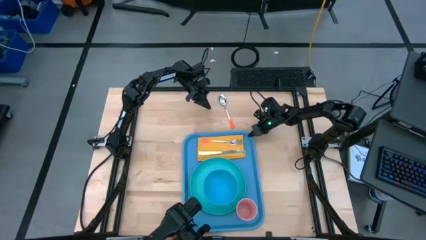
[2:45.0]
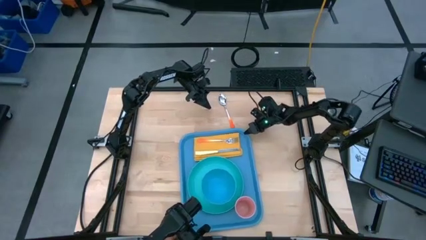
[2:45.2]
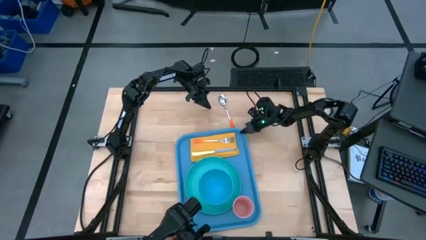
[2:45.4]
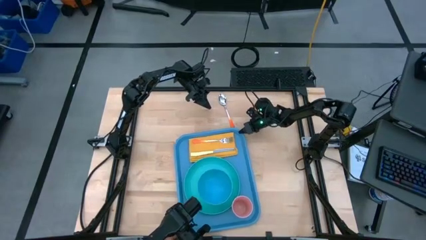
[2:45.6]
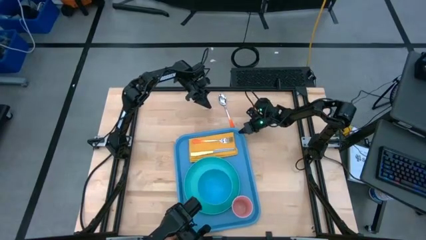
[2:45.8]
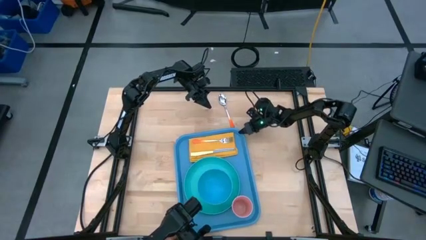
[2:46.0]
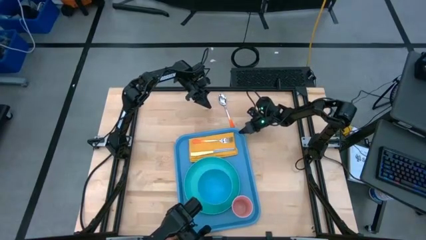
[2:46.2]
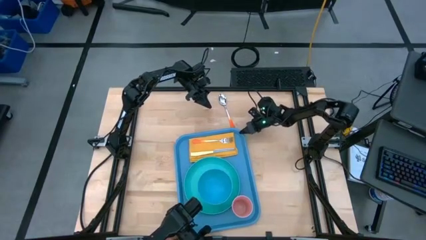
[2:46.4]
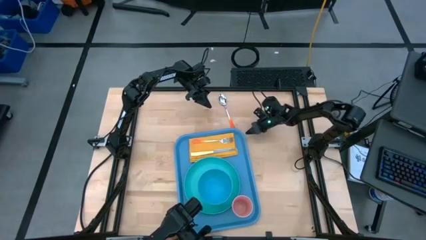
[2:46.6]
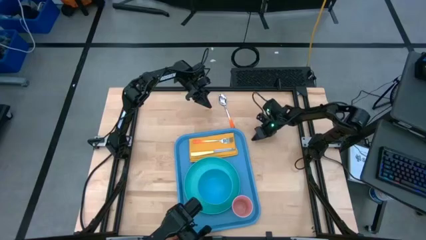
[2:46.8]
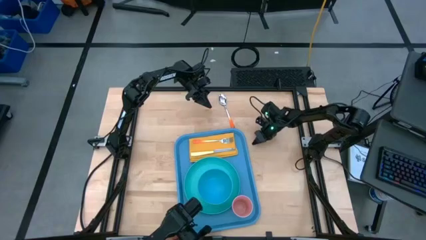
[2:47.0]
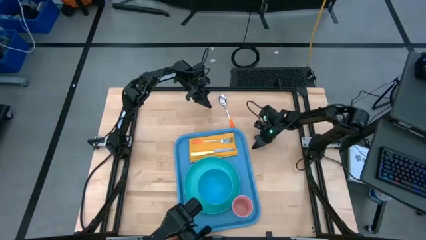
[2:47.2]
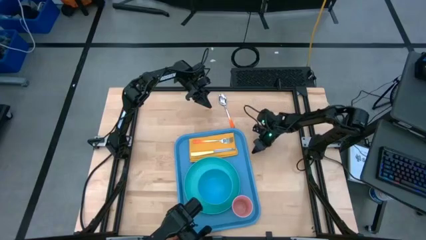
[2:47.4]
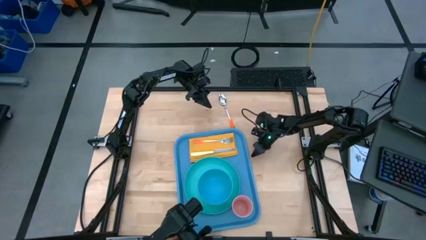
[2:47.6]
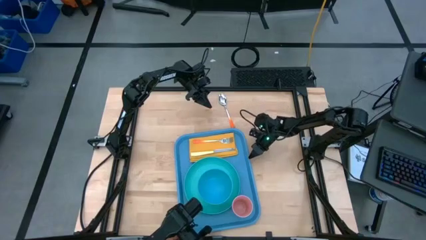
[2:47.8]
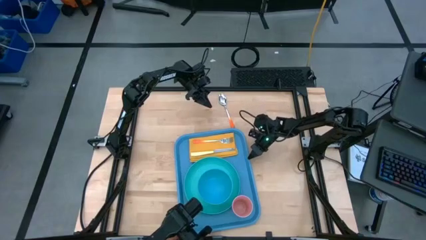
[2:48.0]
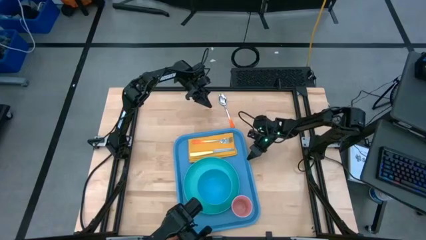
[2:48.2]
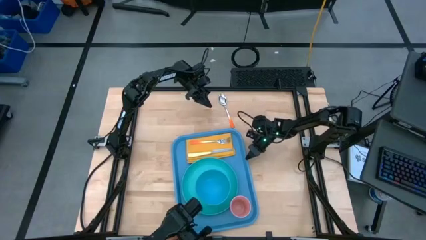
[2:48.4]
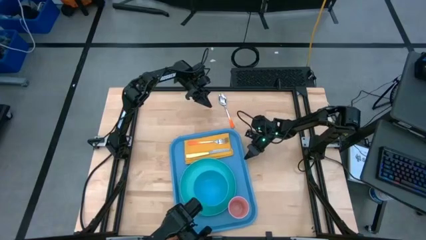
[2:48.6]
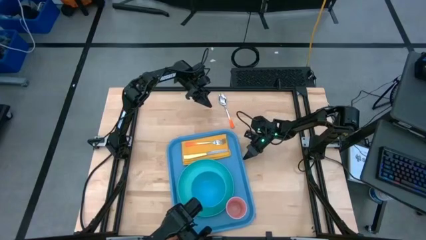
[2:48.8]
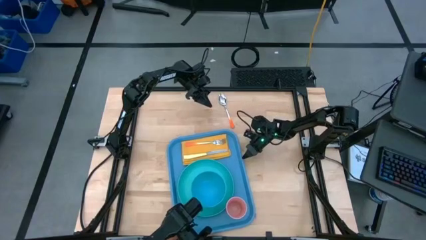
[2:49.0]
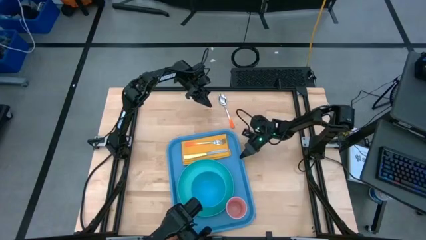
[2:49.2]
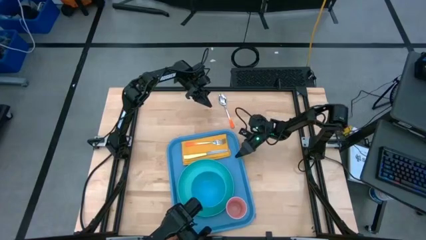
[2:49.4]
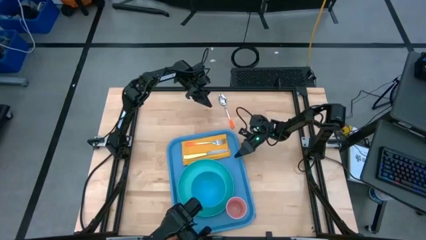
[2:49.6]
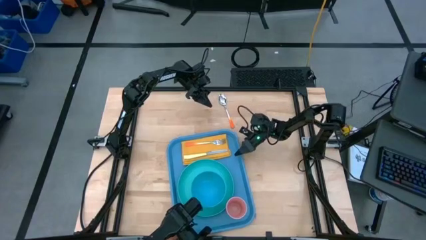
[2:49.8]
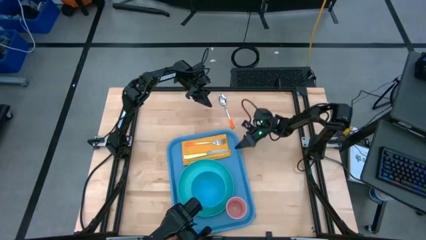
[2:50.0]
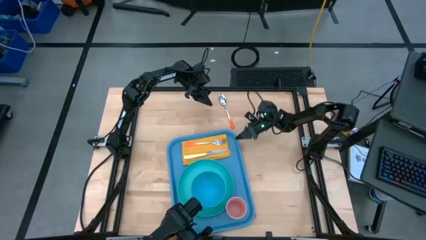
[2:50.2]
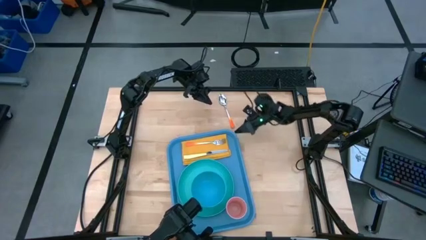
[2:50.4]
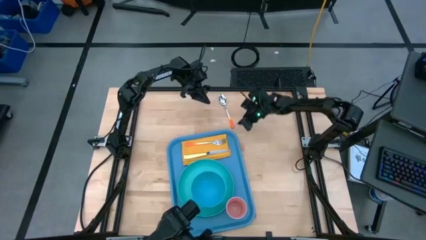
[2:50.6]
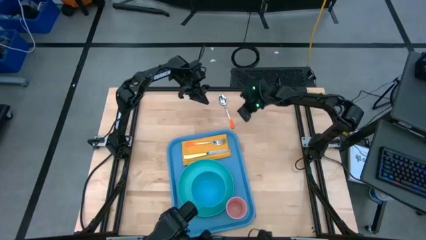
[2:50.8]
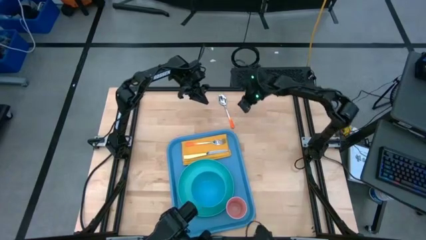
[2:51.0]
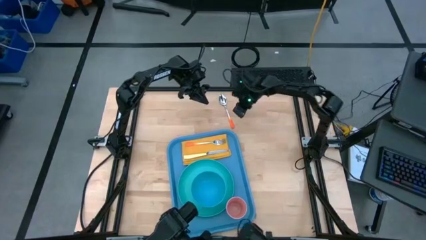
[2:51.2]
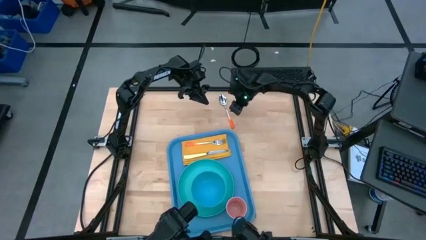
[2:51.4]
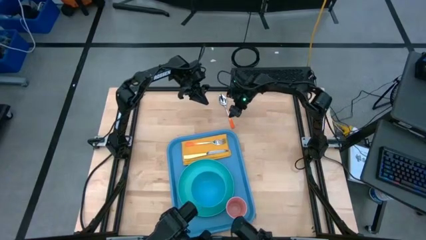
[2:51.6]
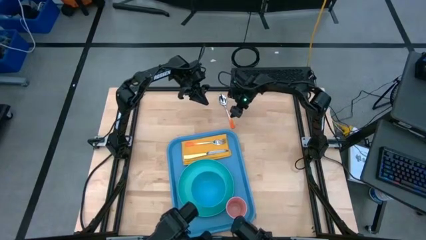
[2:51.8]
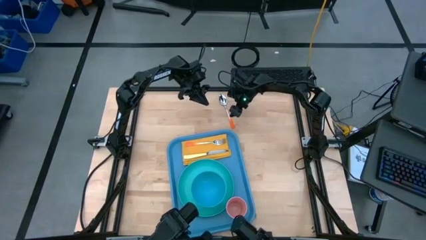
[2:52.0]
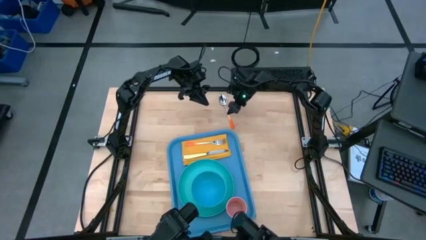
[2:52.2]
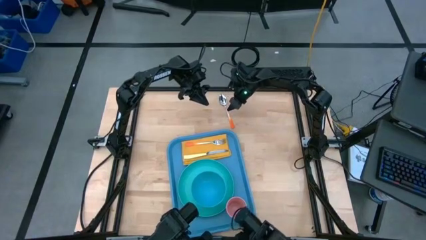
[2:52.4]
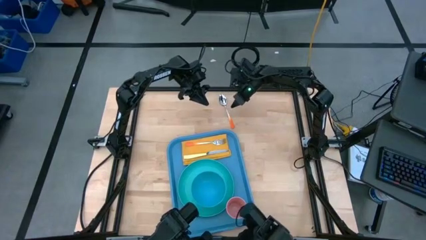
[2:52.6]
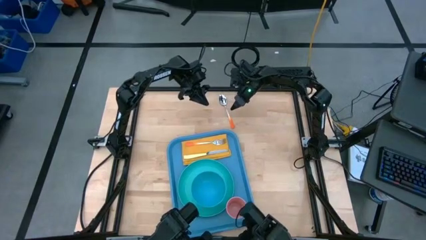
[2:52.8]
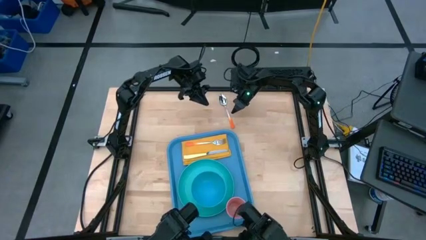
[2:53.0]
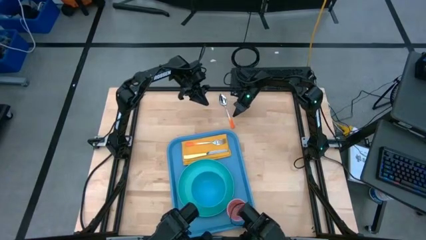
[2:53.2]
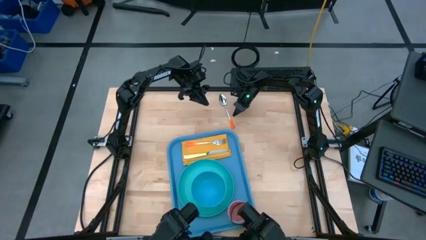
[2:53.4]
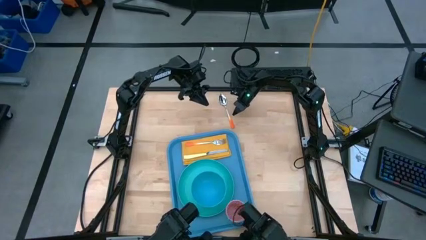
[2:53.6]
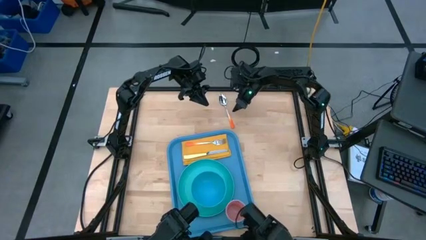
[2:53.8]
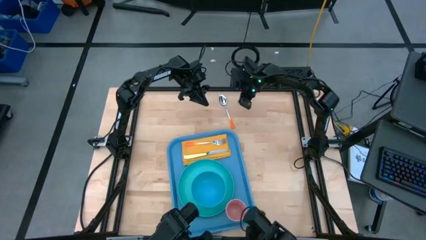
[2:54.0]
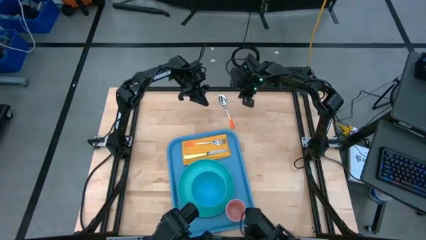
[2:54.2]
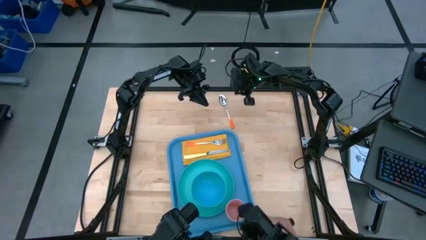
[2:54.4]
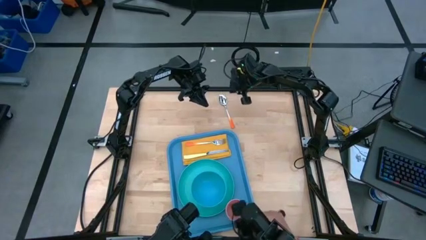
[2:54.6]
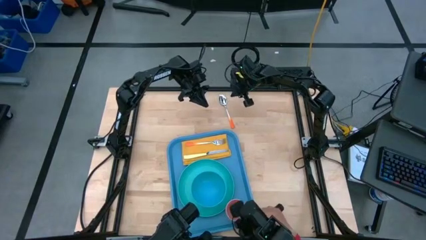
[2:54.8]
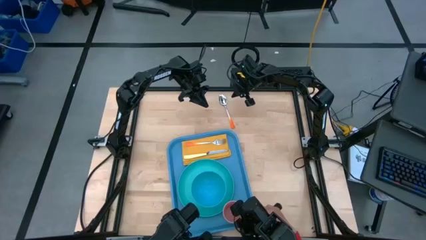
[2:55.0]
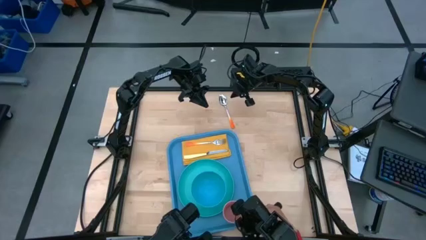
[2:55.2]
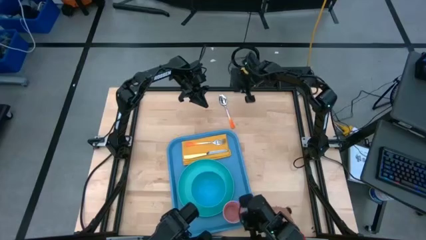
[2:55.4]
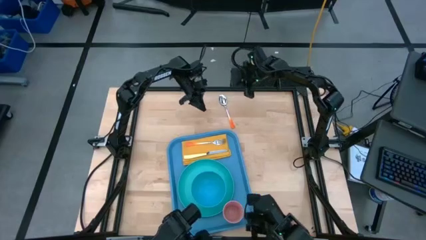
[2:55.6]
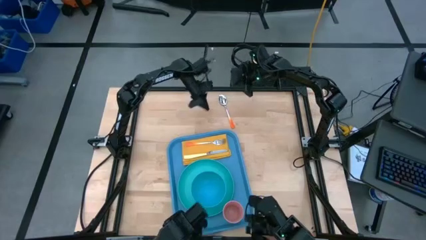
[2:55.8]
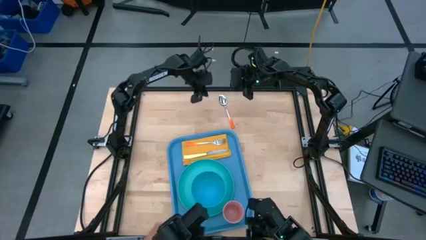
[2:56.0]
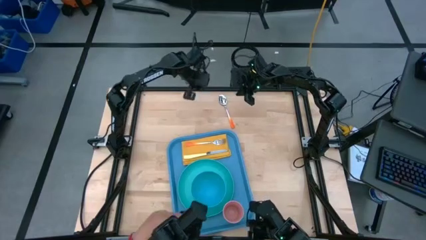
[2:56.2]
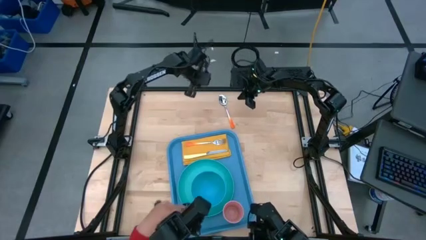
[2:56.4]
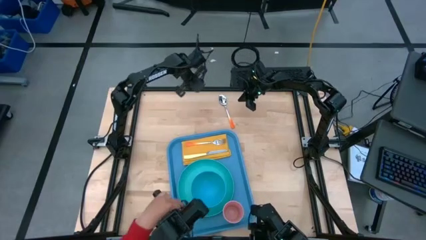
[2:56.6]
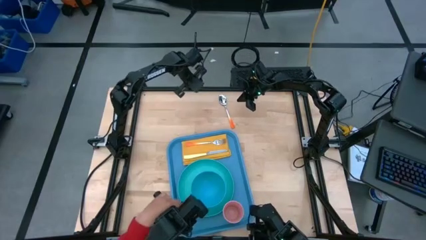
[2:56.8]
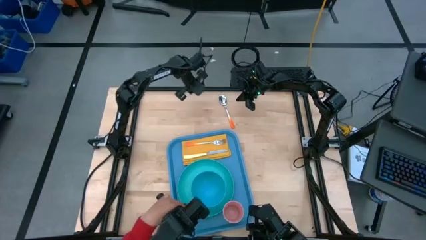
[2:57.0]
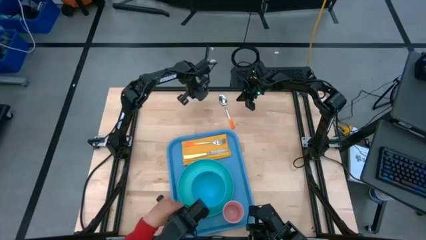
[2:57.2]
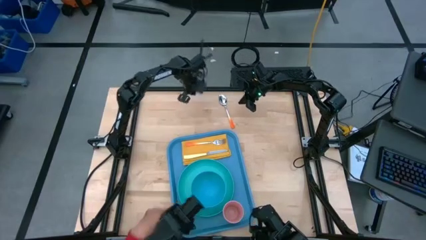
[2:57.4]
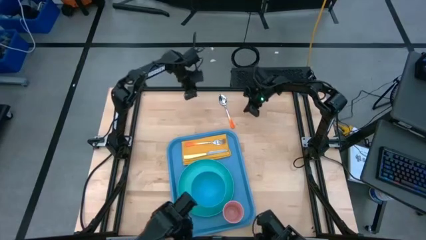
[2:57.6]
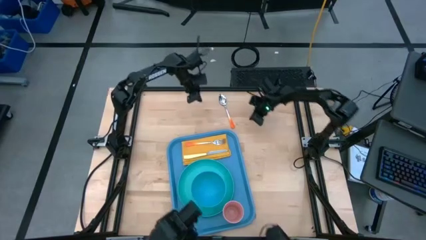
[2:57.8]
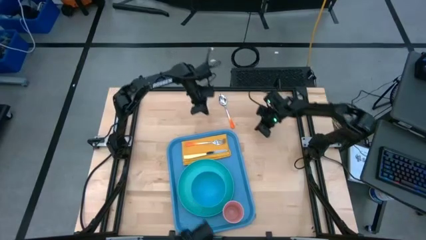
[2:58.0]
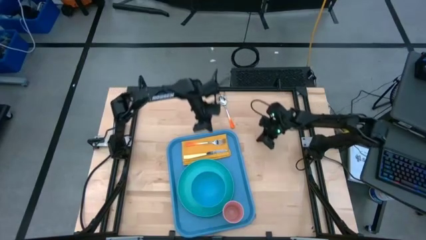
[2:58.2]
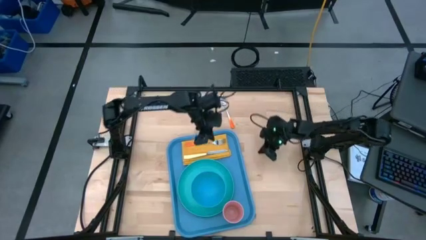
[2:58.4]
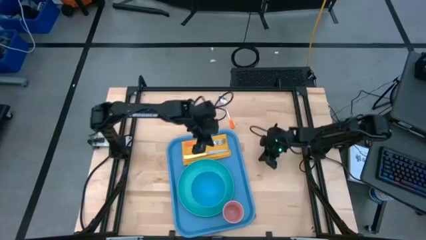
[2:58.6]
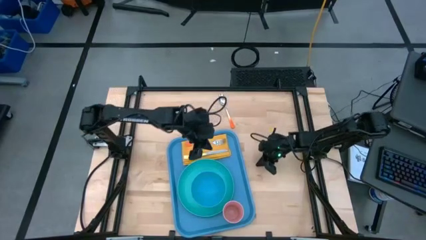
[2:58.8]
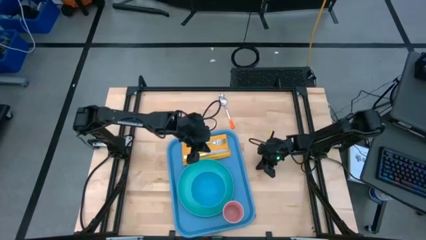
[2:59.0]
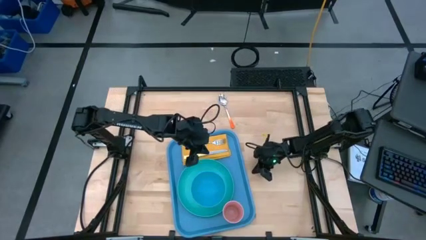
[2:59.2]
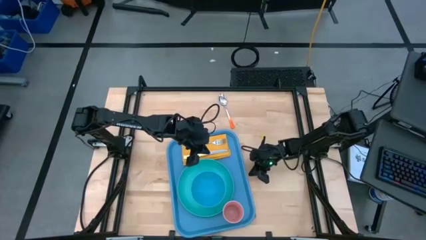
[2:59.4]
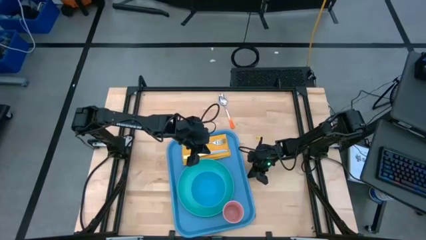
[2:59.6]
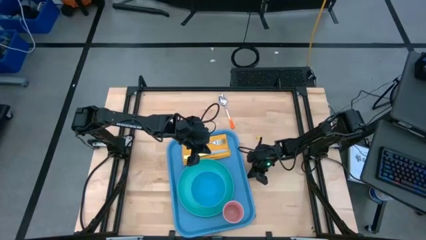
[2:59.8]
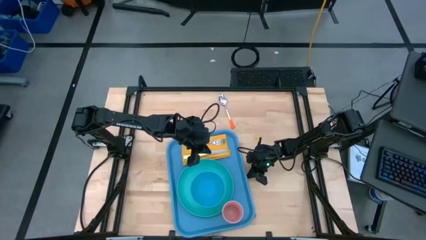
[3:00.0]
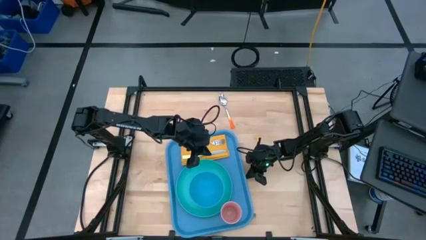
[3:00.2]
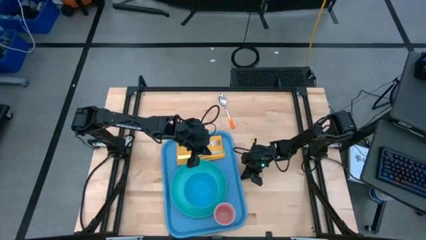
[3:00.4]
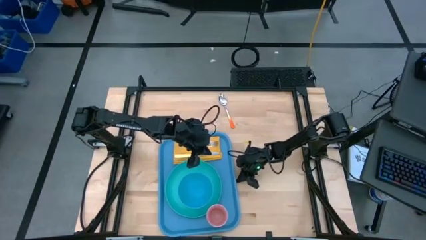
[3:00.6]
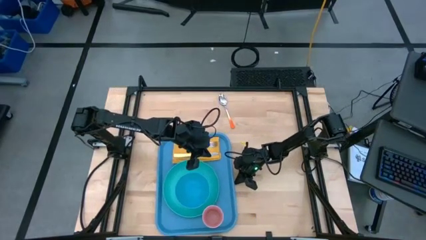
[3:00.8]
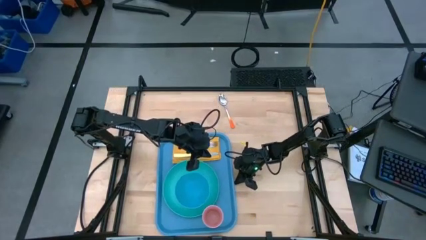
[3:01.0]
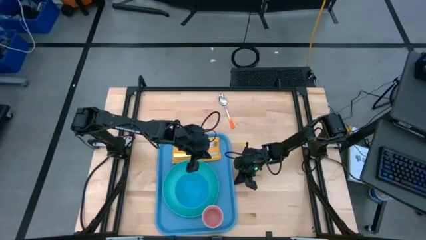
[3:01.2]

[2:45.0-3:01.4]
Task: Set up tray
Adjust the blue serving tray
